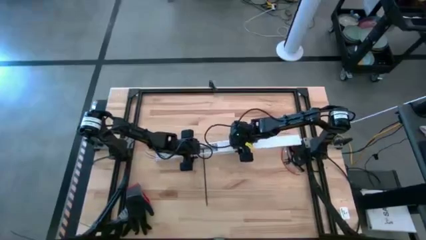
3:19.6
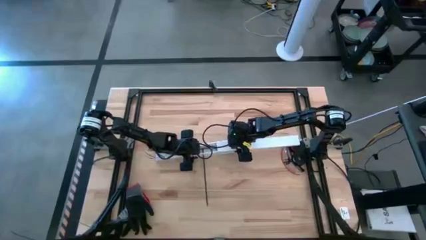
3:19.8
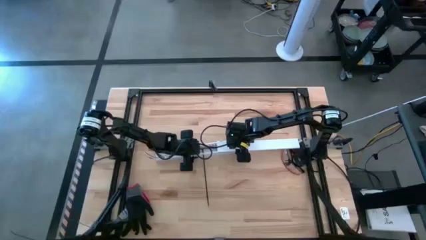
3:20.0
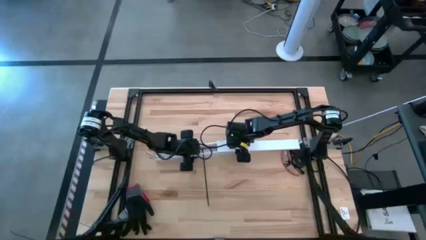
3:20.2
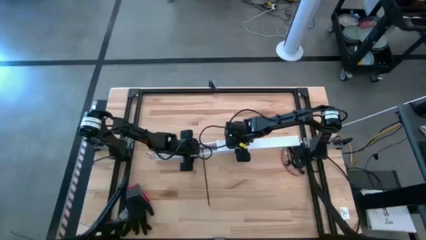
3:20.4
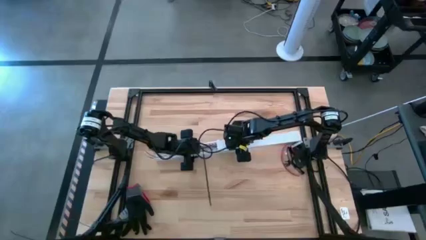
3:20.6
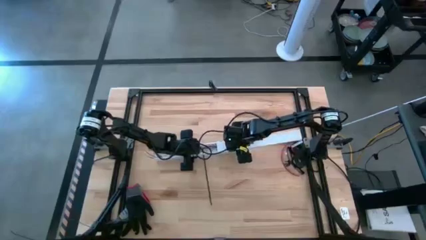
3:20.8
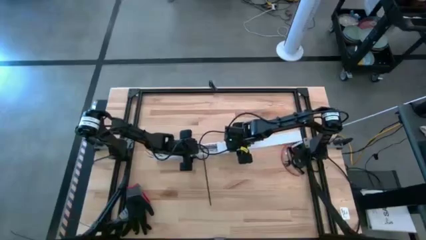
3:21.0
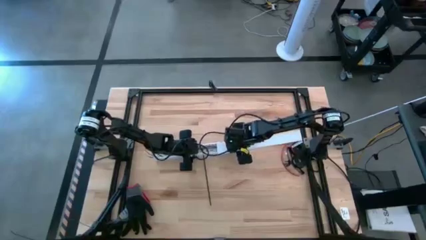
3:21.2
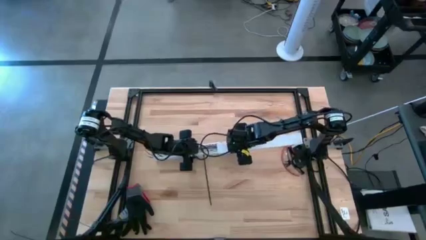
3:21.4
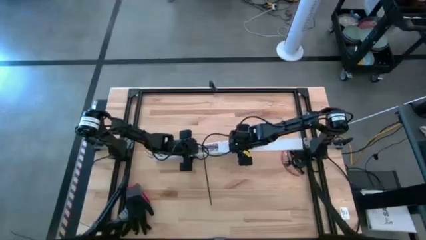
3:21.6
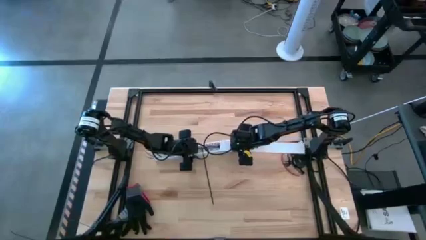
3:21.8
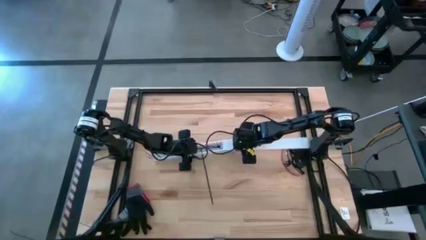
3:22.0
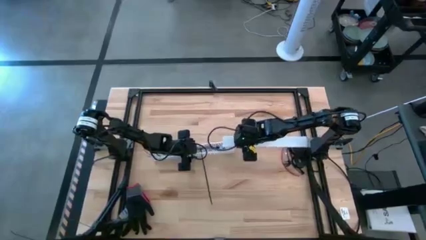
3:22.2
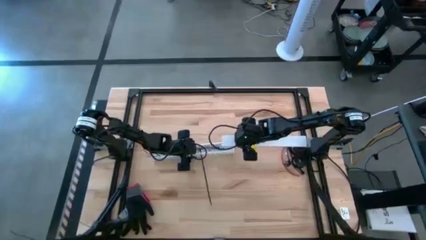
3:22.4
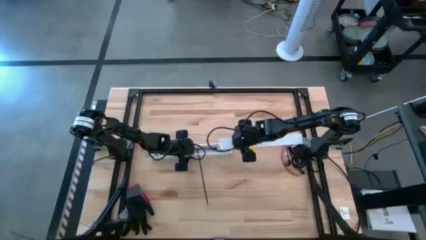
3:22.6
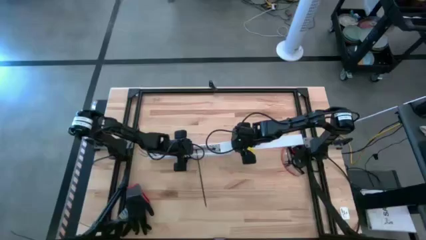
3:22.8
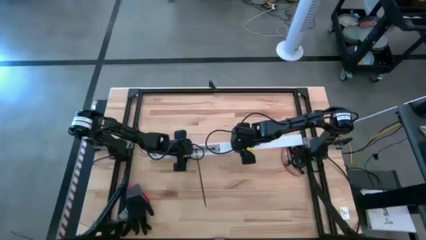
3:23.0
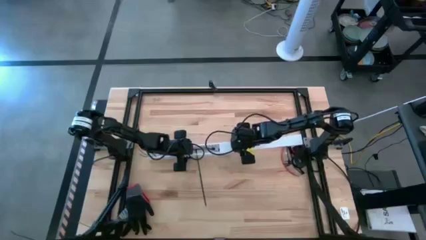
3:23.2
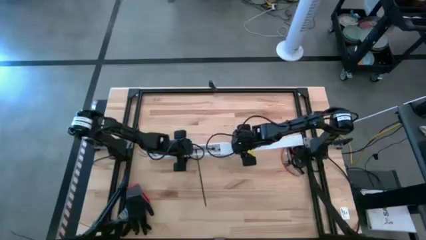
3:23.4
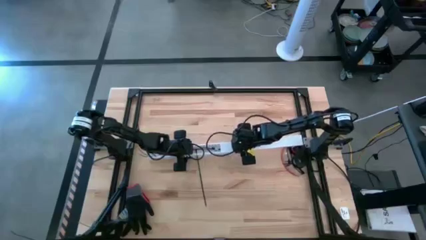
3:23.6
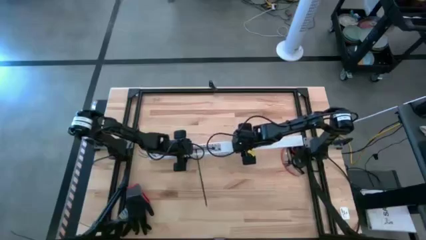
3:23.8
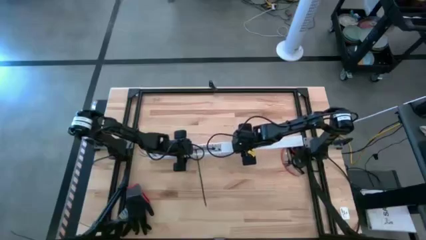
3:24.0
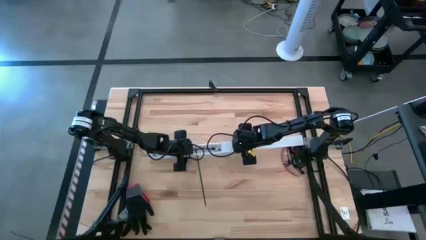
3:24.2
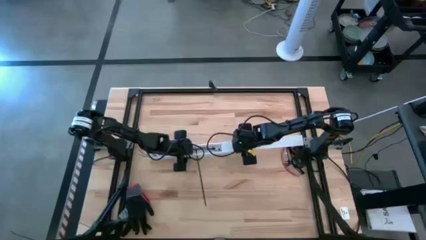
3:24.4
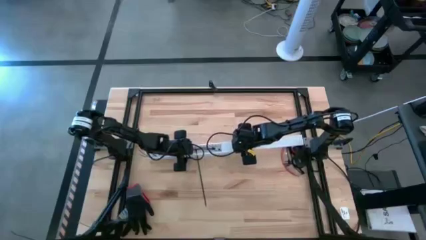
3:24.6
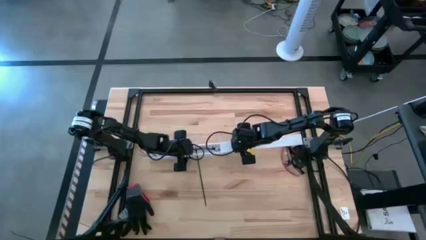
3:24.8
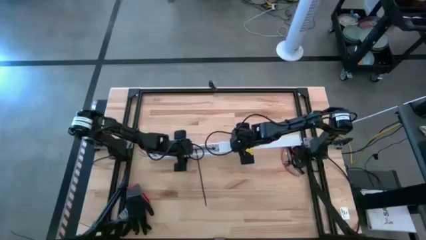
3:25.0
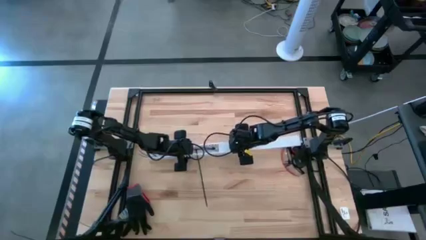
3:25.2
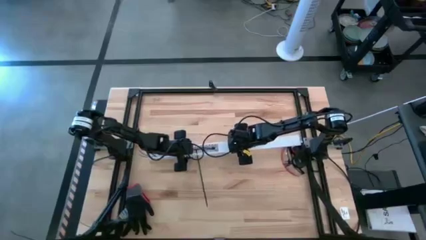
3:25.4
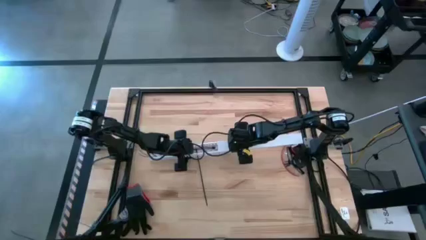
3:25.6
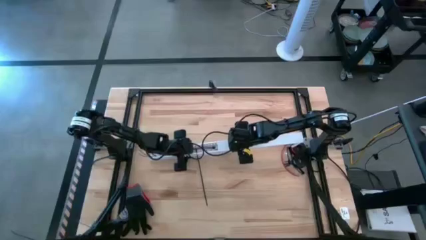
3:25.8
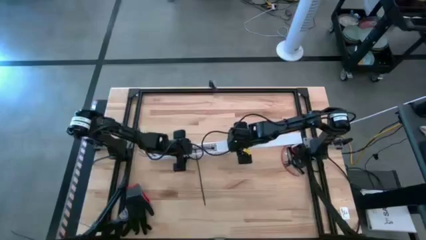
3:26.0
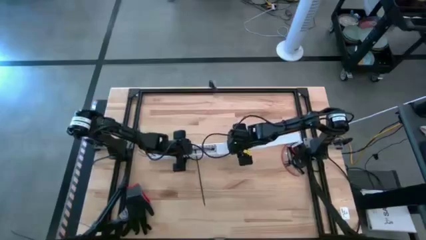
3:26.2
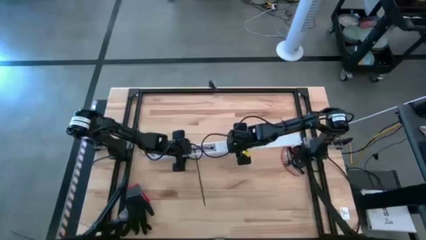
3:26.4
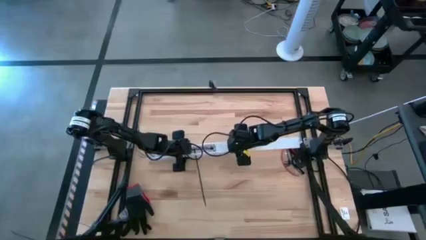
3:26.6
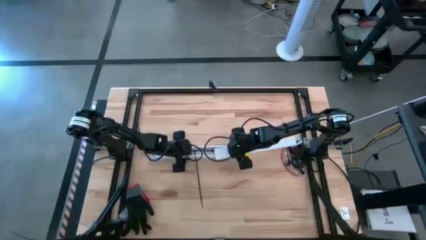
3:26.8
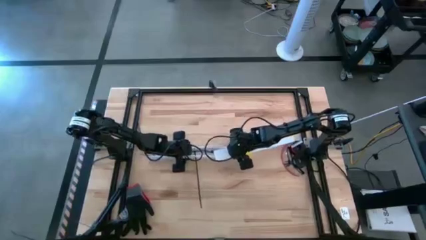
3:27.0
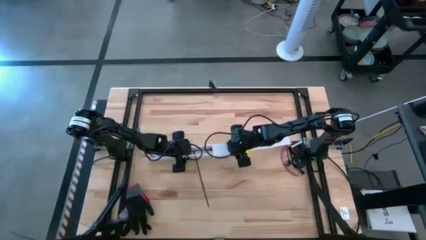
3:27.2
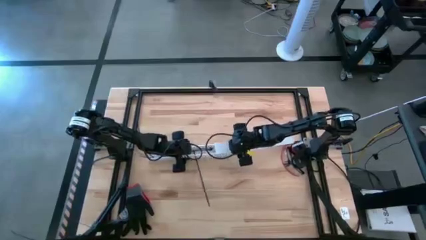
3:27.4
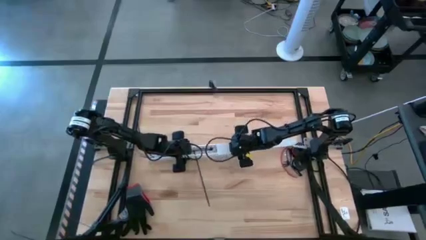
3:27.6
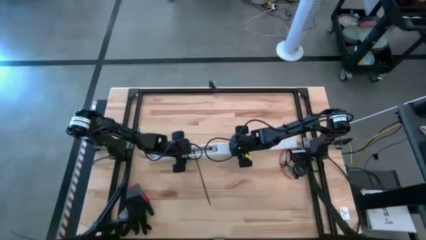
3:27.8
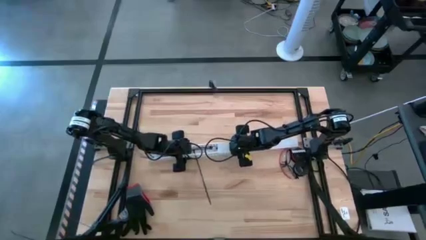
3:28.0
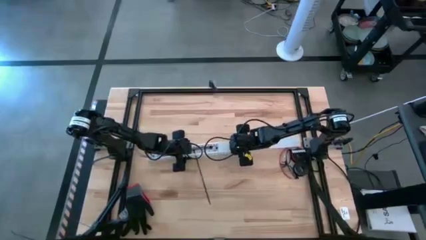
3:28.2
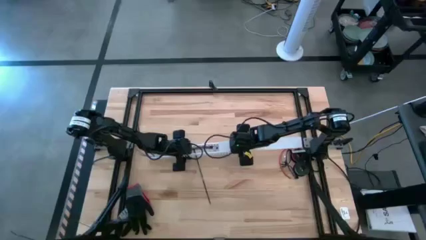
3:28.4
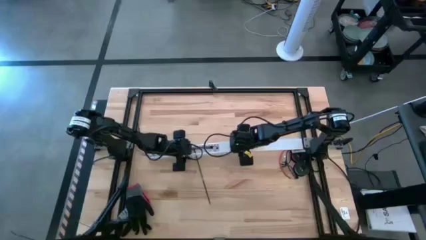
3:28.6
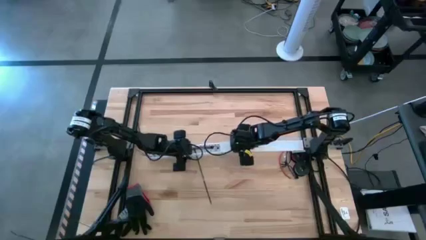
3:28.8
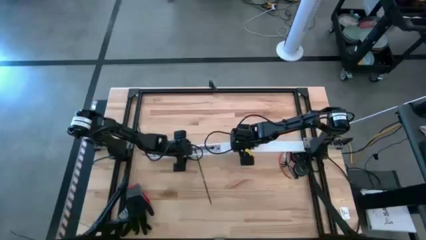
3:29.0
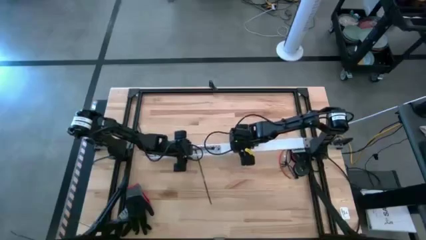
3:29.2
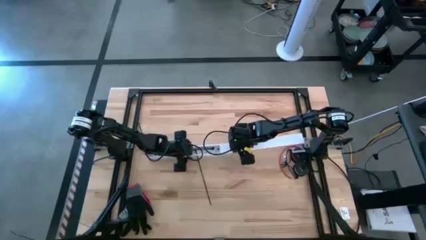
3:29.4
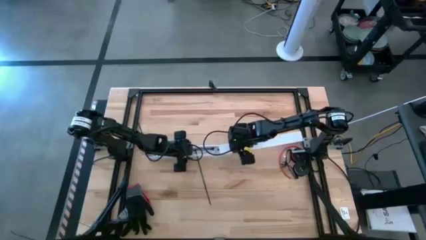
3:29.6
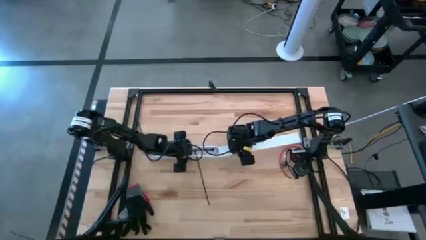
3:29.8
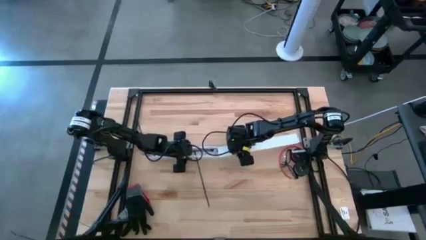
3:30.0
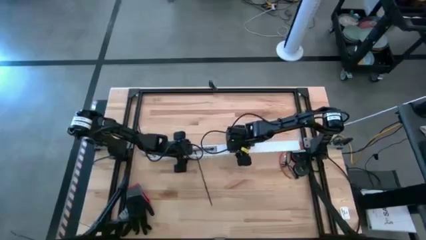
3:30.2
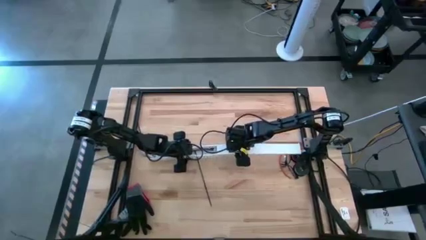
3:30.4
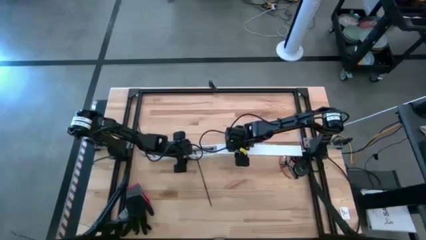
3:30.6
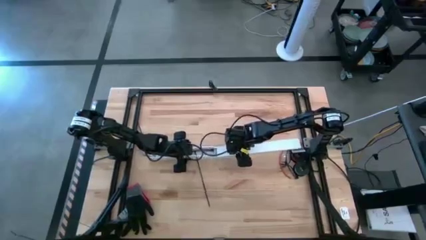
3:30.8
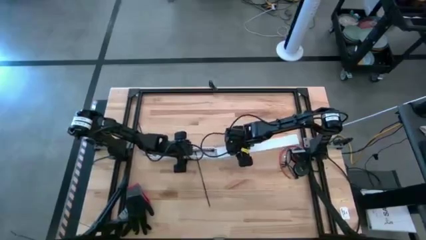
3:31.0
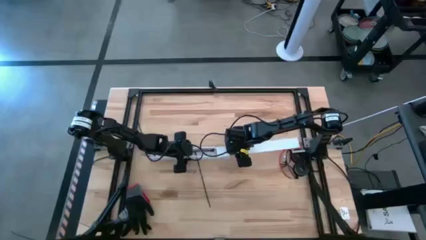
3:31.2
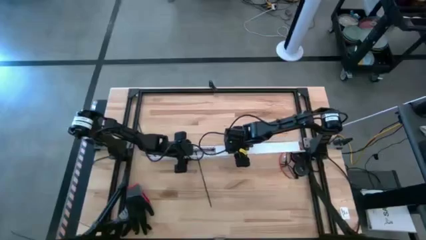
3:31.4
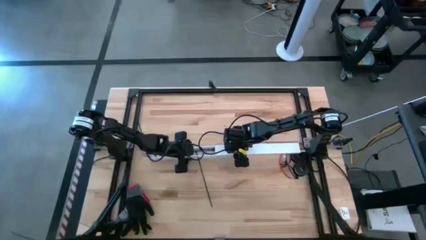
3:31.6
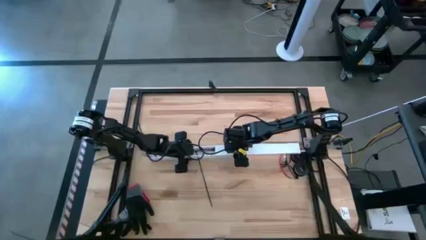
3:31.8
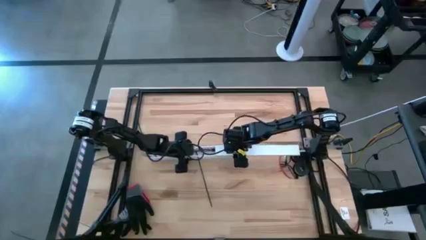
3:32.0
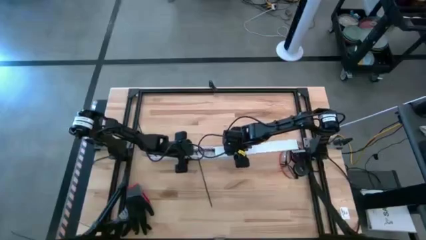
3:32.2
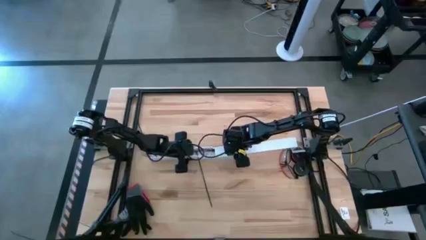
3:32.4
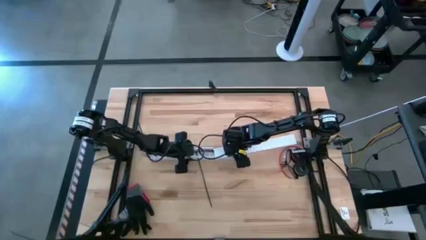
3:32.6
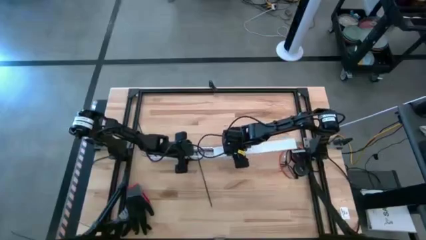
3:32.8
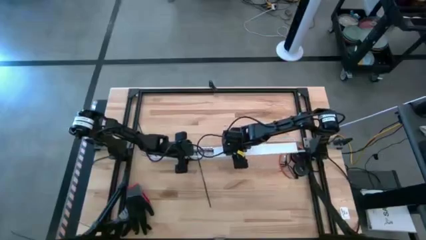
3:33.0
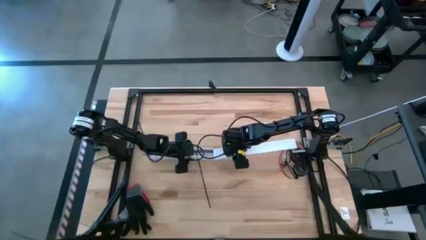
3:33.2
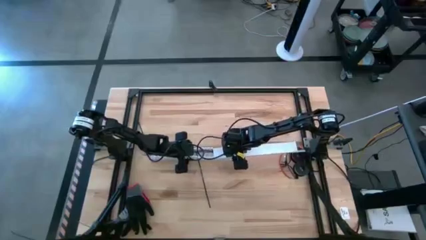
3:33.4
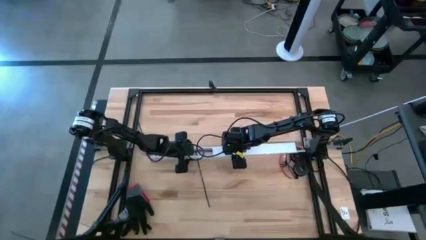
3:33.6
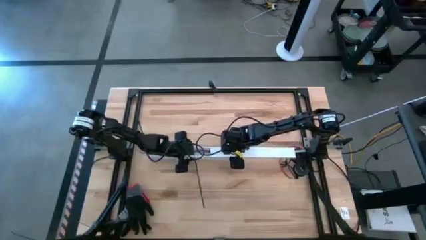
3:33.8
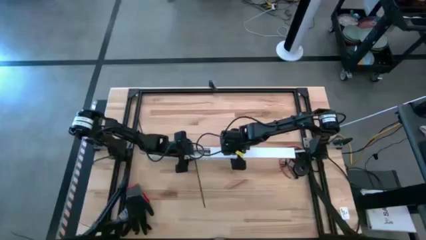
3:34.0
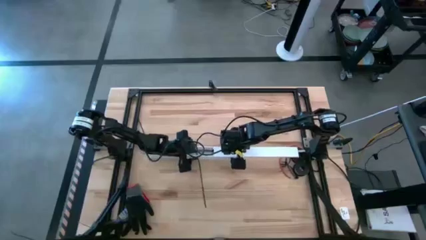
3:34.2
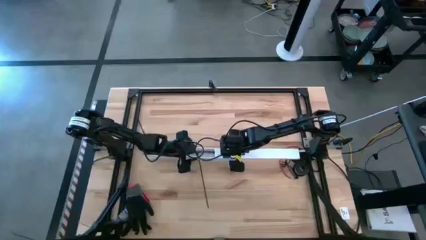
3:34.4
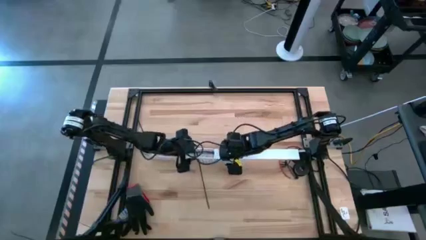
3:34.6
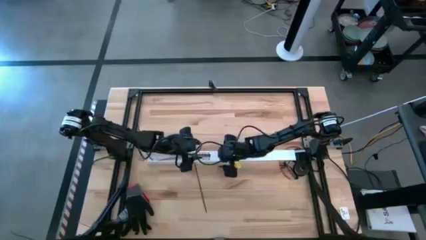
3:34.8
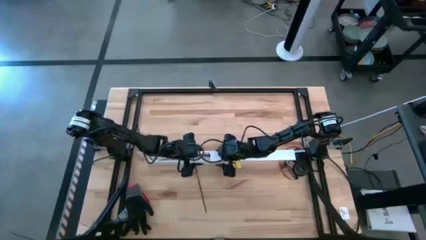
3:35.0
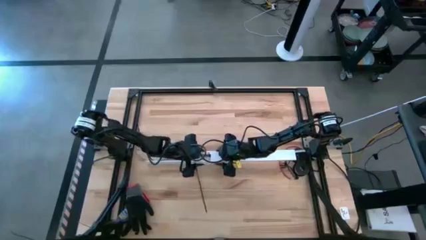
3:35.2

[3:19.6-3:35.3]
Task: Ziptie cables
Close the white cable duct

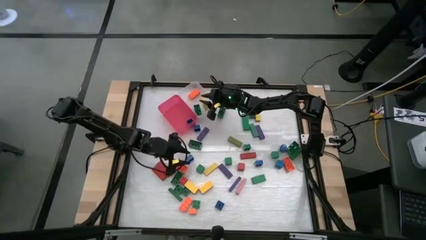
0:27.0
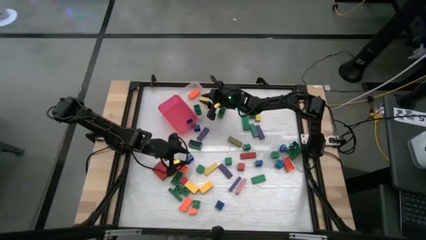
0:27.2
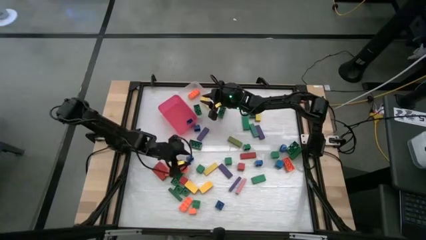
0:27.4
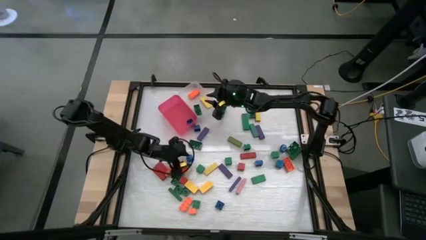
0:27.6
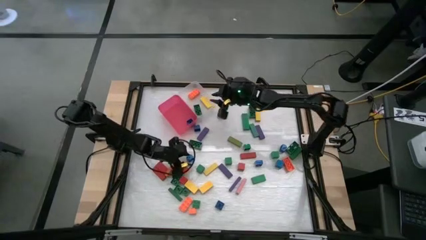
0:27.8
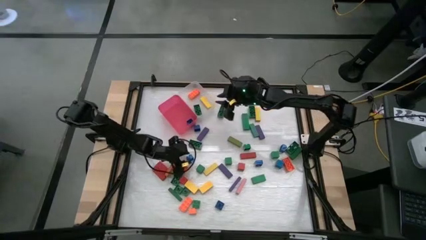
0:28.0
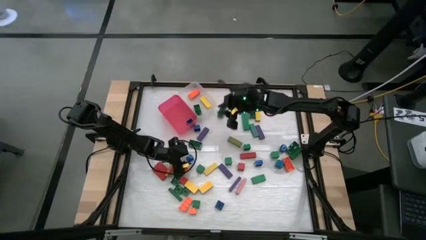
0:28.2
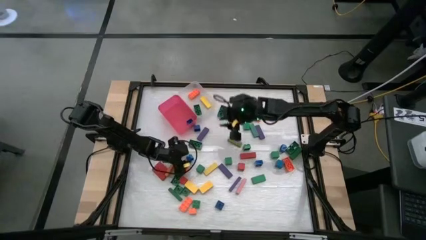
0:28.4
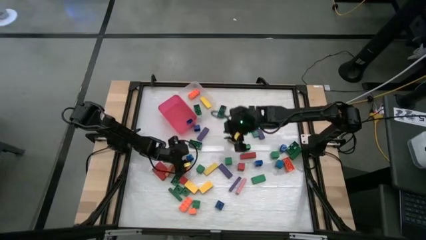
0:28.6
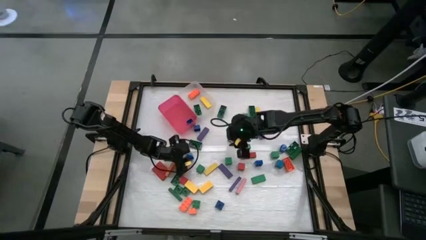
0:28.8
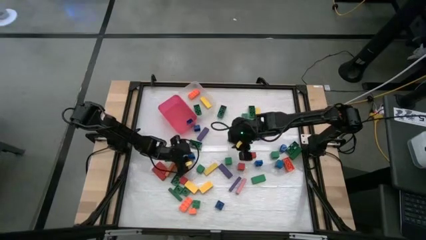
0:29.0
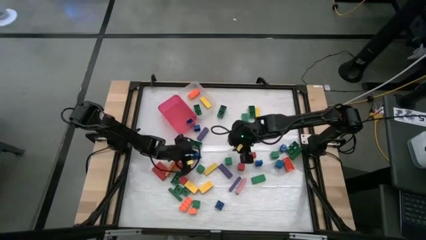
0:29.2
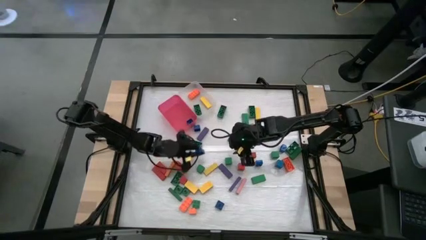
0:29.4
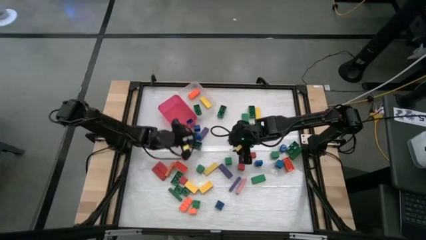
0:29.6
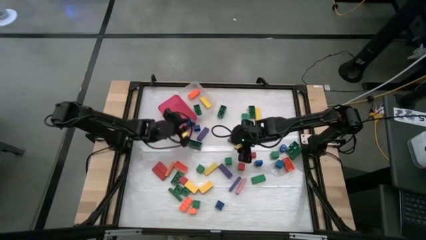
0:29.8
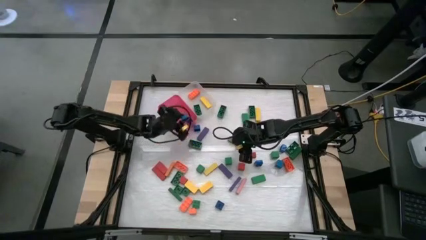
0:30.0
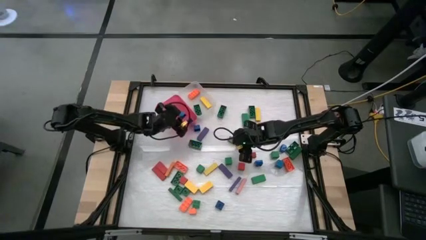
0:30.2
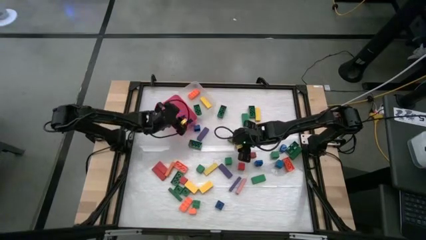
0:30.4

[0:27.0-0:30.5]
Task: Sort blocks by size
Put the small blue game piece into the pink bin
